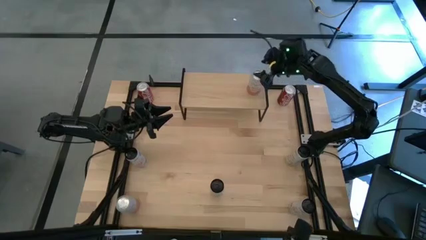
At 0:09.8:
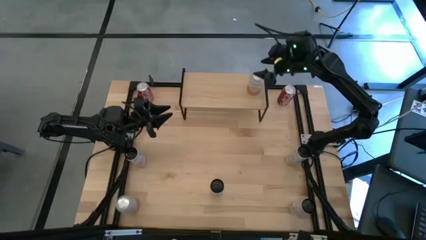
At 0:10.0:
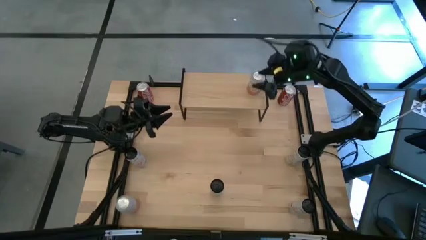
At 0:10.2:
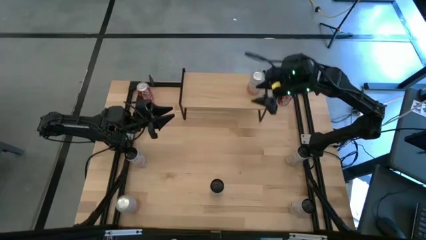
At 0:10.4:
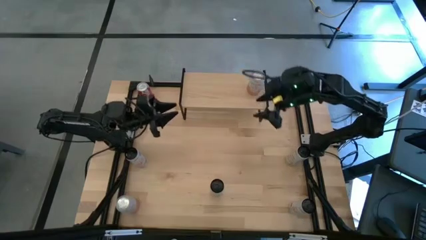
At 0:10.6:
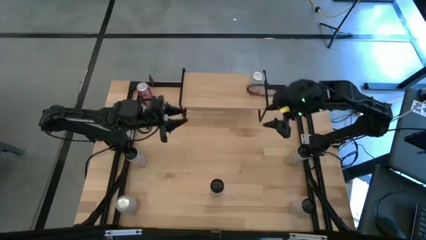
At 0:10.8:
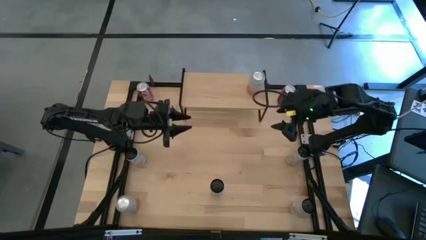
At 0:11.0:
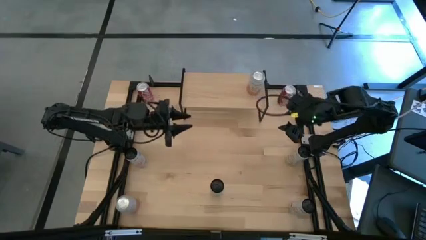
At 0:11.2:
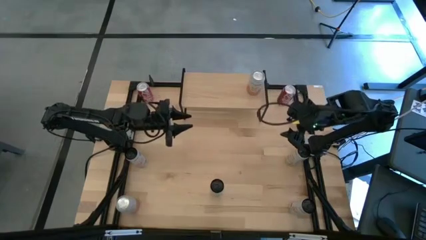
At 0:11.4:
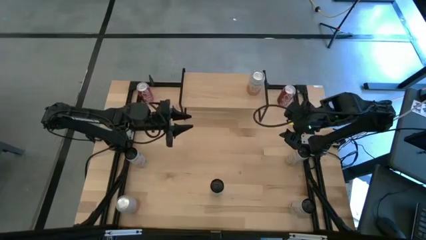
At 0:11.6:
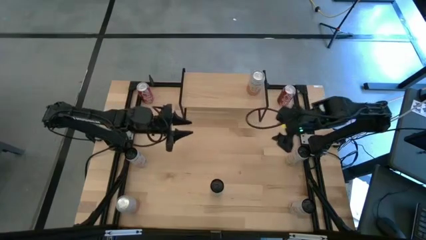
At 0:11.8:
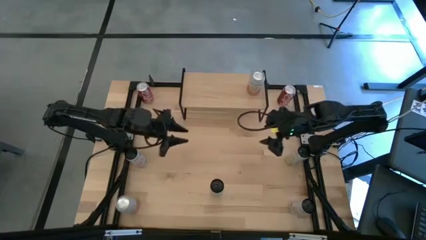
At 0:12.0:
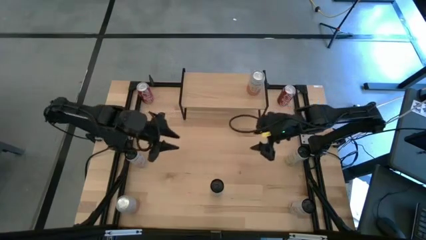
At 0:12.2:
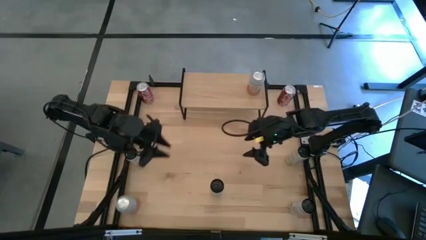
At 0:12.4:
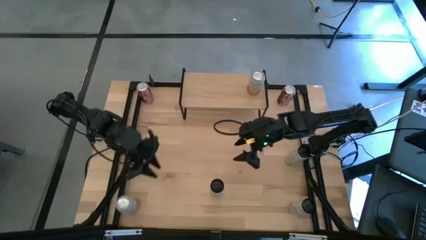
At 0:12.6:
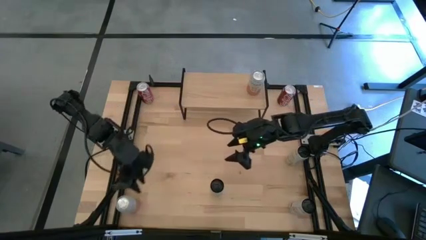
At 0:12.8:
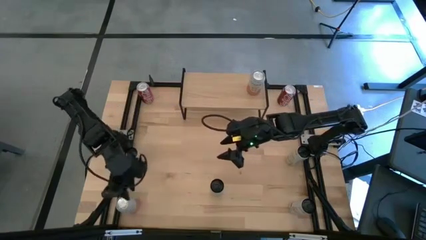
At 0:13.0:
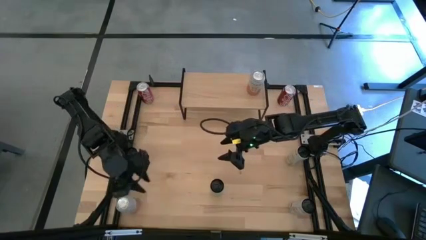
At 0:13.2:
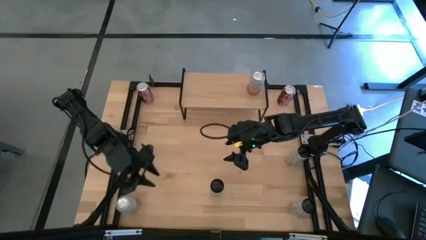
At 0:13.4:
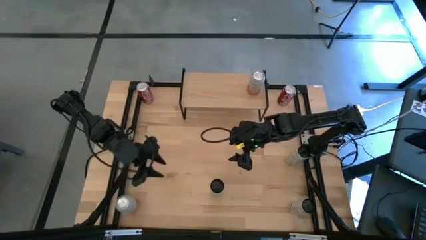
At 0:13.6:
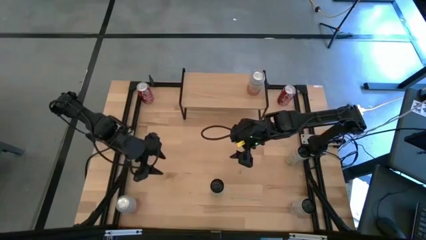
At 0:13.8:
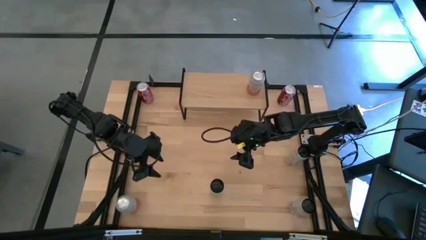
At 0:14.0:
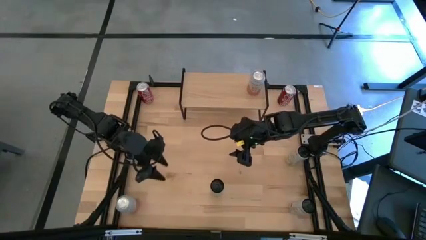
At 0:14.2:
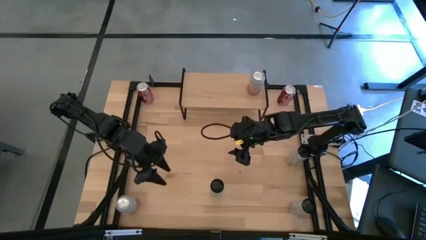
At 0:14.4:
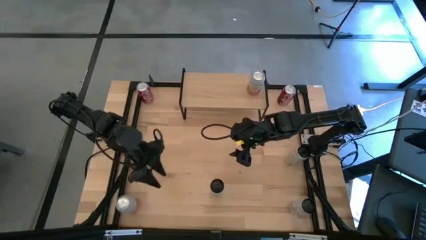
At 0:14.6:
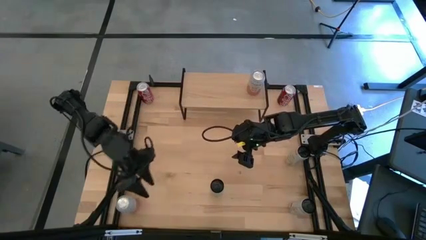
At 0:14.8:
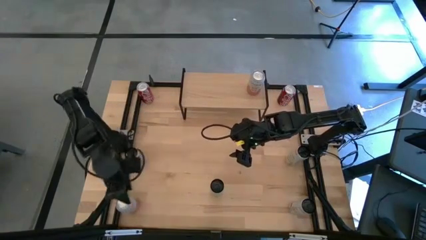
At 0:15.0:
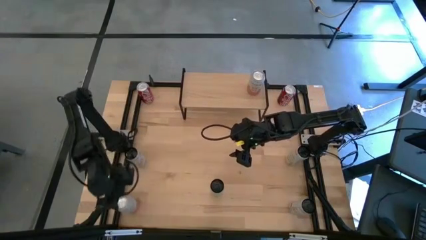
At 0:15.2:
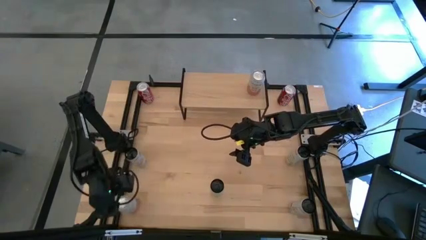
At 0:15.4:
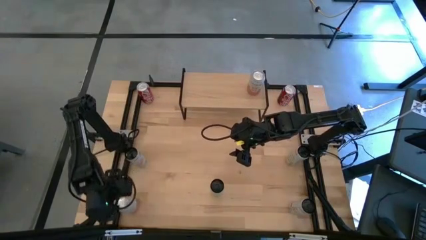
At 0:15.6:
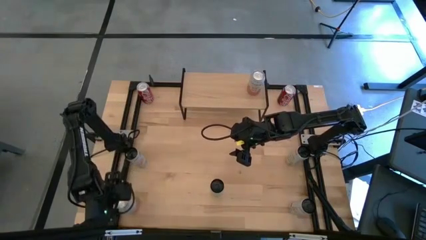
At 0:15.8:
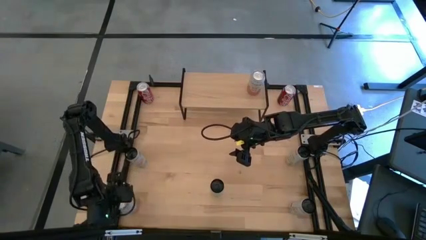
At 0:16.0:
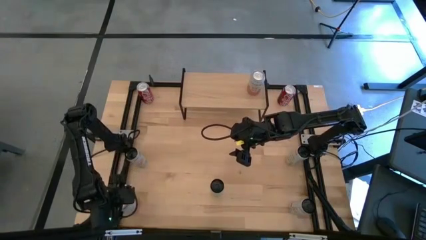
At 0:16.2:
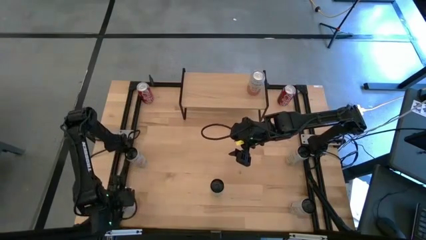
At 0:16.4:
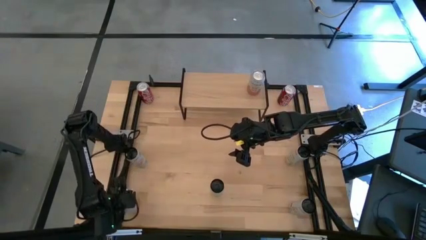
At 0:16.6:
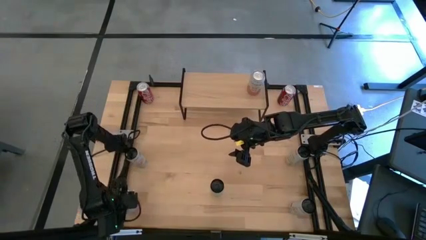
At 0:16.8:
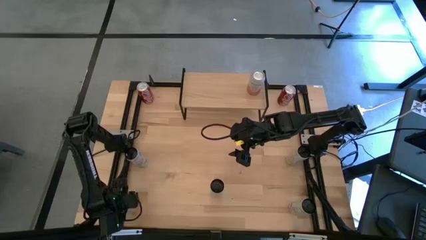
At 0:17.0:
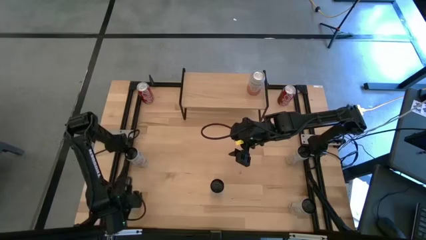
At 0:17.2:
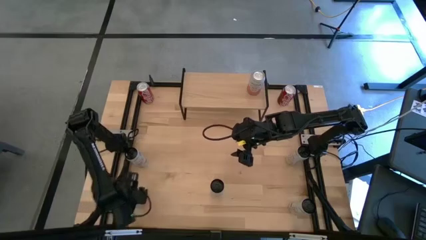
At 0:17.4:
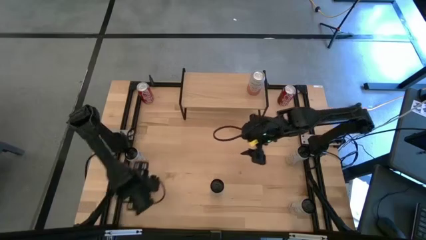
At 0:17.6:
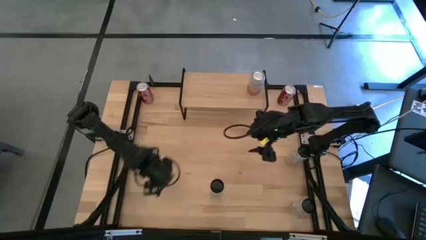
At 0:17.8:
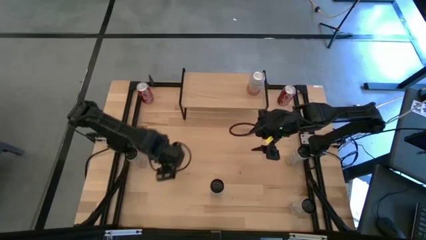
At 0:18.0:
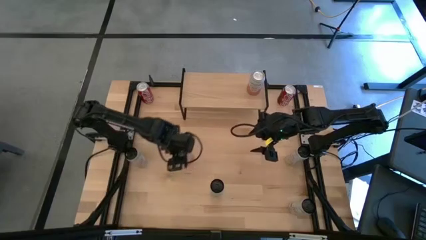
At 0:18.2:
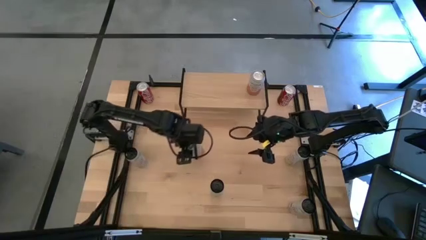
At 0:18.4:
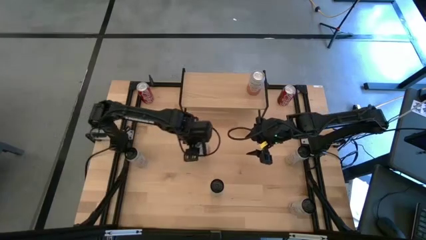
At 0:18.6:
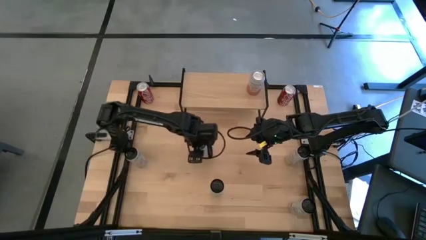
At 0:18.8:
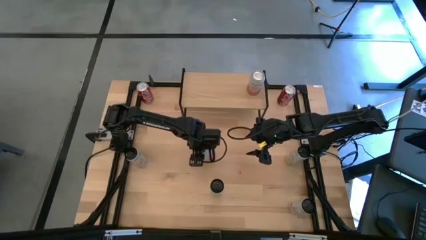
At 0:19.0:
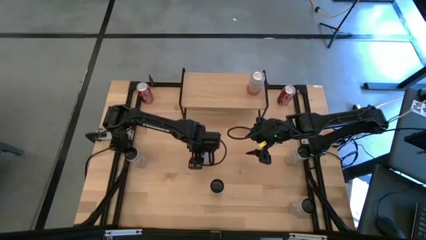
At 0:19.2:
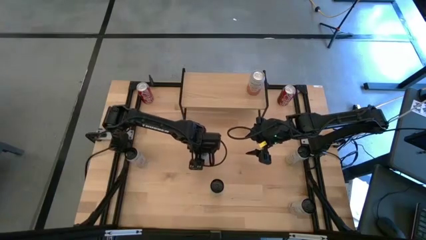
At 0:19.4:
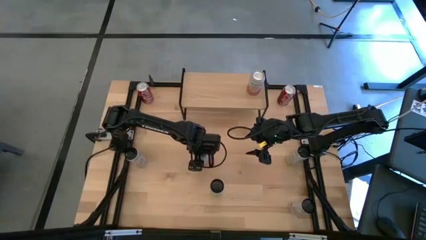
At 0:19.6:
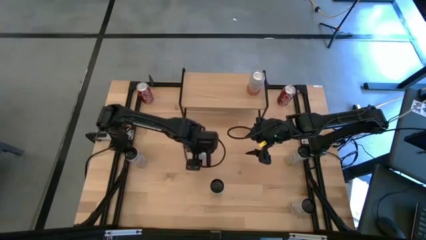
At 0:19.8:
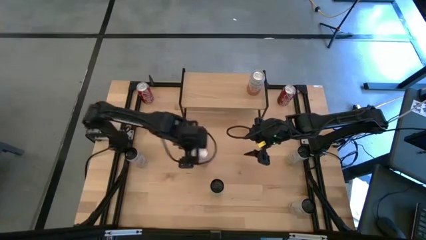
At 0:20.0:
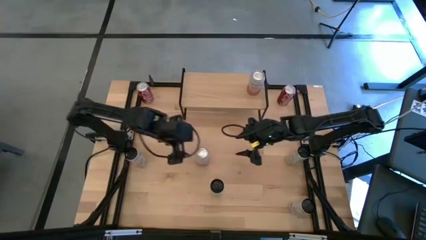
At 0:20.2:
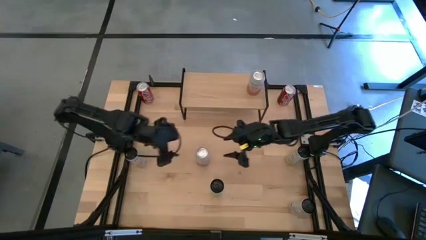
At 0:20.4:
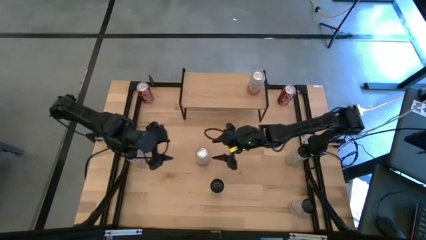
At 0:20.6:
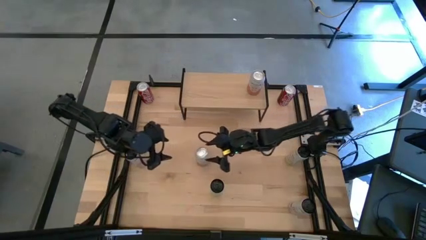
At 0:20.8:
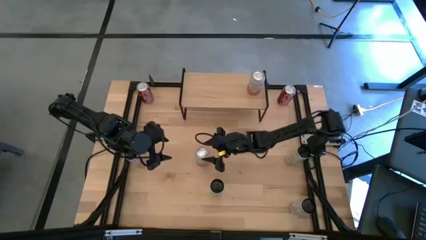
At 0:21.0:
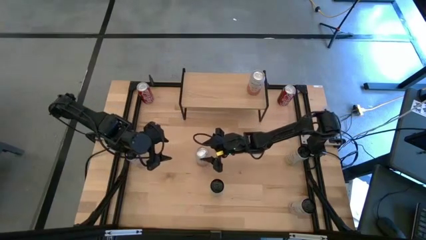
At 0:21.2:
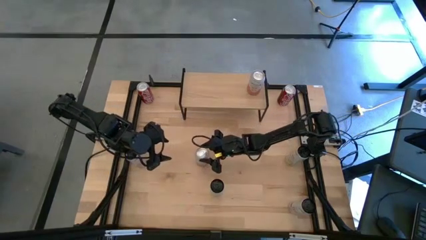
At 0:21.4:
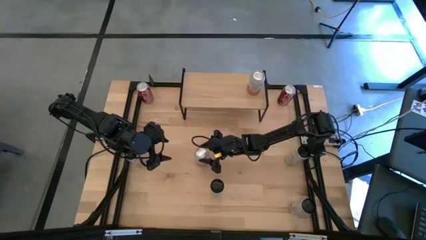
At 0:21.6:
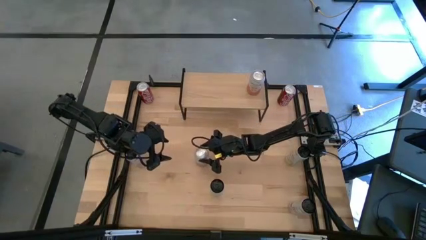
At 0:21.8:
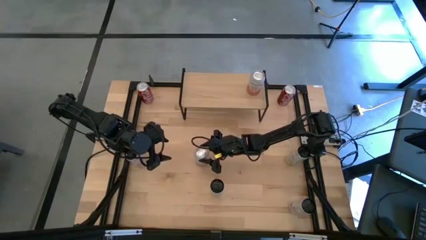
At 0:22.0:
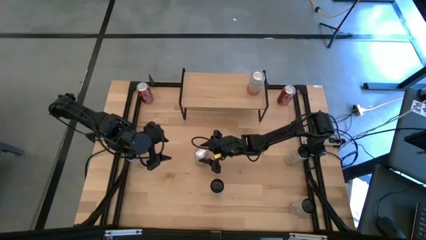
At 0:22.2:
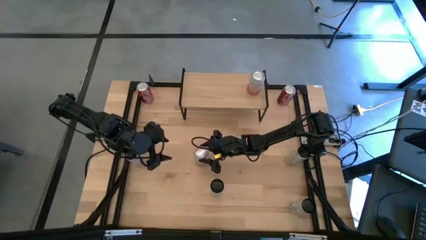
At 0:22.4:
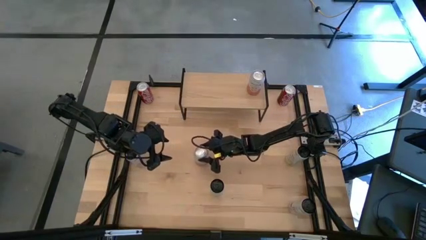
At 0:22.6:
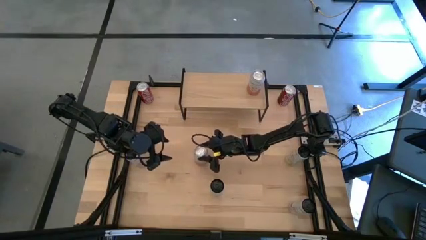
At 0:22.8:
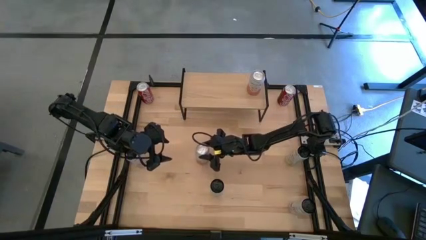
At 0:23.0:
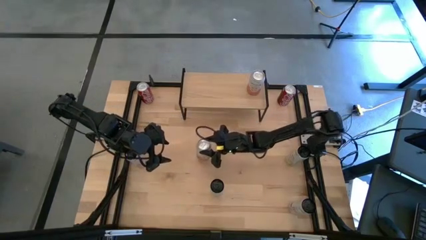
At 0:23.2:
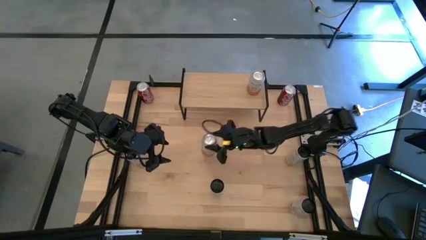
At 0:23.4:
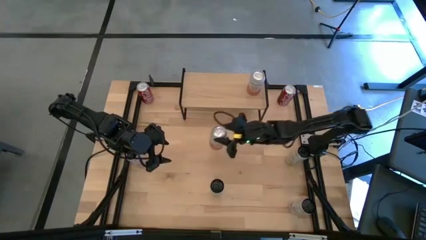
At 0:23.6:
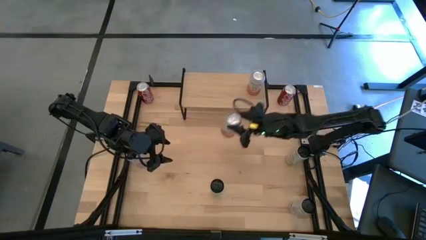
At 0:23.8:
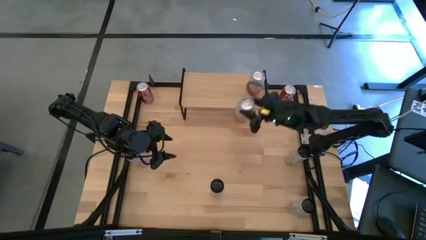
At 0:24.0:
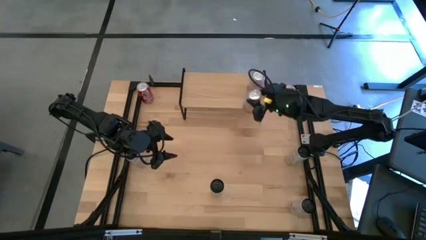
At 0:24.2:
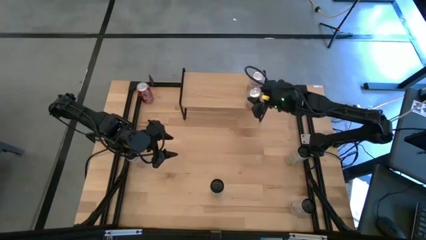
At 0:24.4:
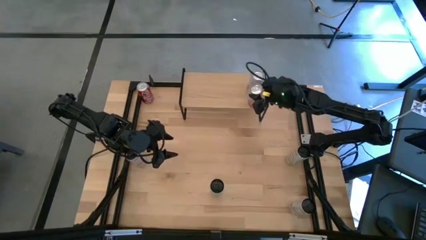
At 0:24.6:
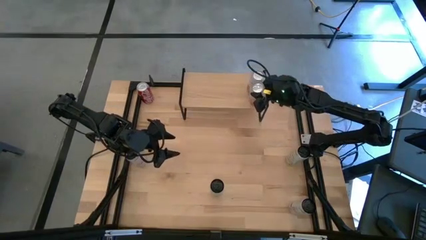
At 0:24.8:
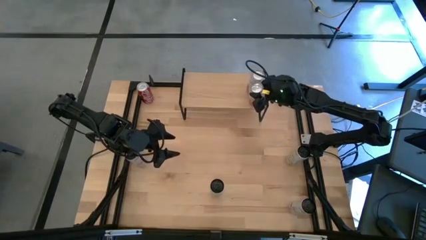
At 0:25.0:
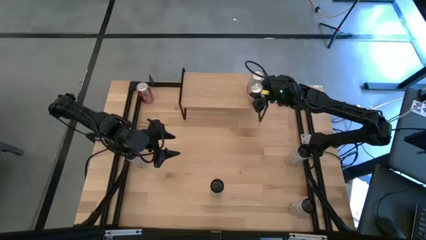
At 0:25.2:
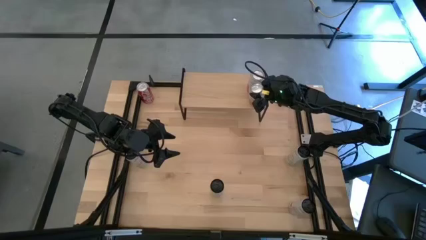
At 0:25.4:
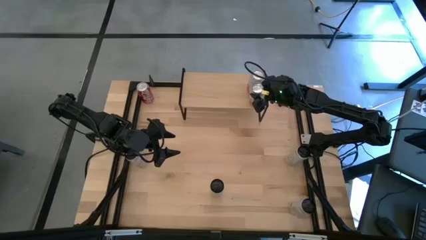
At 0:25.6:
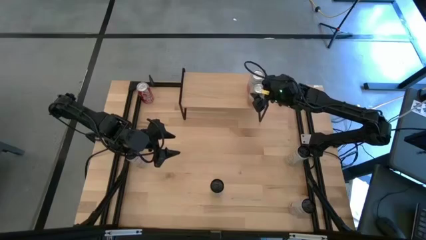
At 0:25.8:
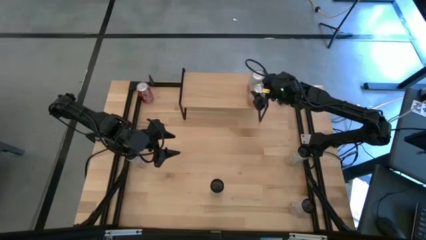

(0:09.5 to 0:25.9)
Task: Place canned beverage on shelf
Put the white and pink soda can on the shelf aligned with the other white and pink soda can
